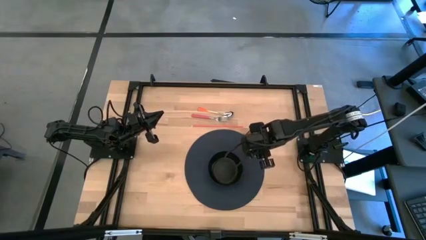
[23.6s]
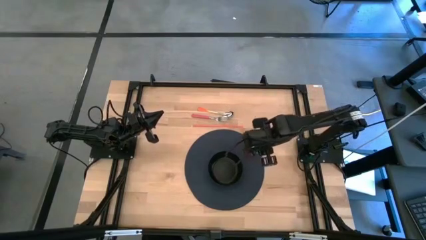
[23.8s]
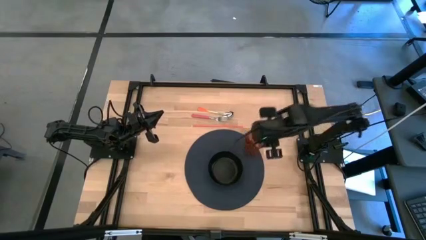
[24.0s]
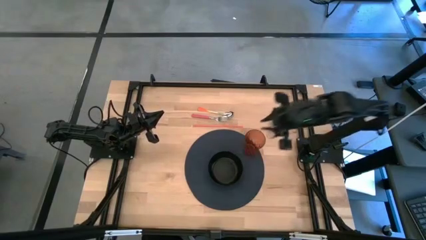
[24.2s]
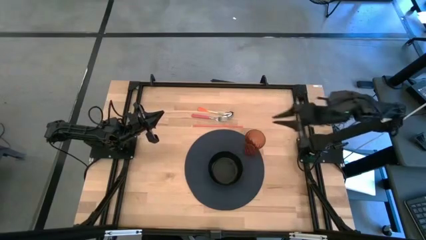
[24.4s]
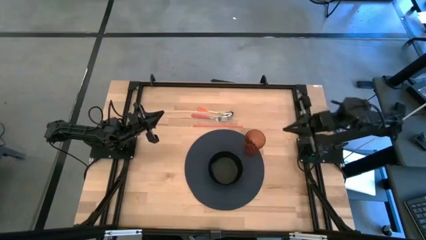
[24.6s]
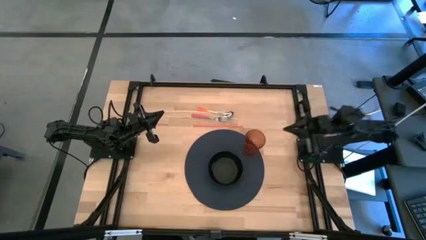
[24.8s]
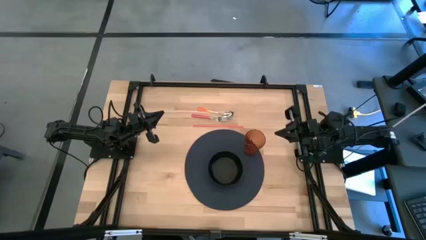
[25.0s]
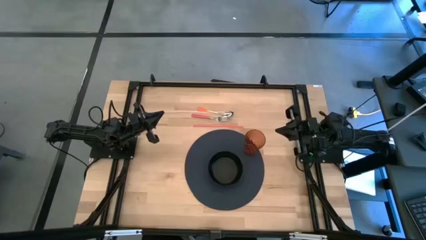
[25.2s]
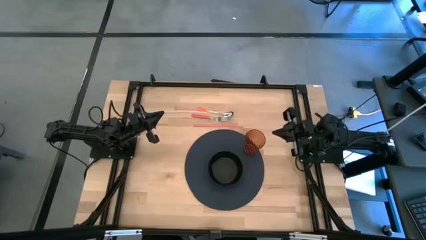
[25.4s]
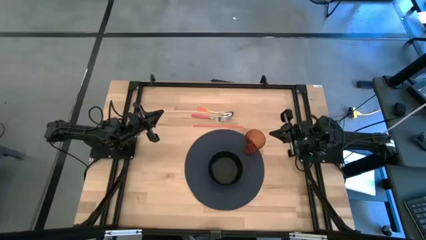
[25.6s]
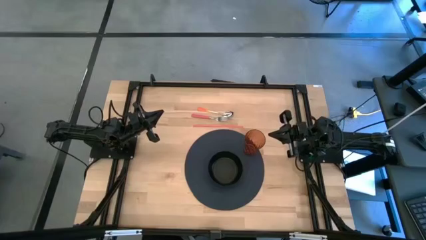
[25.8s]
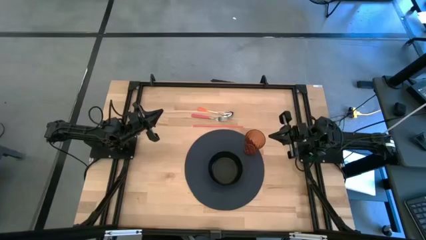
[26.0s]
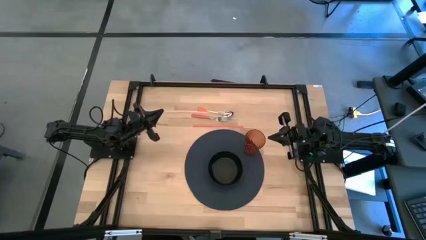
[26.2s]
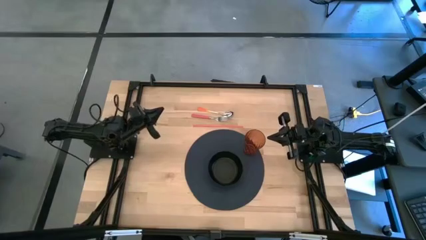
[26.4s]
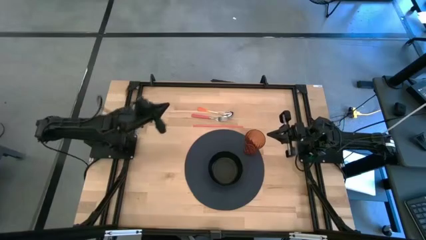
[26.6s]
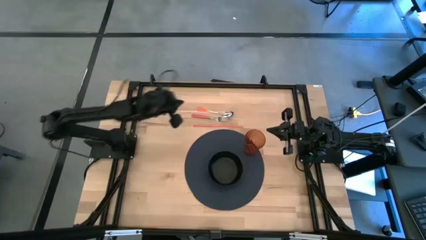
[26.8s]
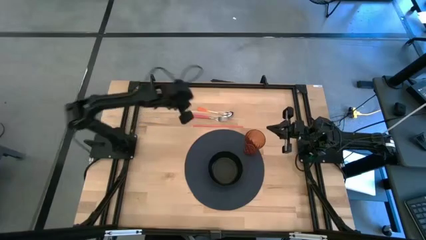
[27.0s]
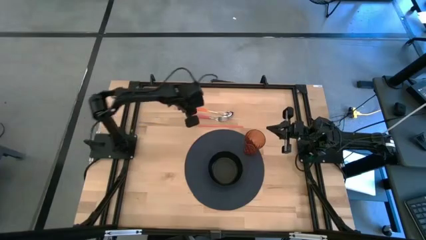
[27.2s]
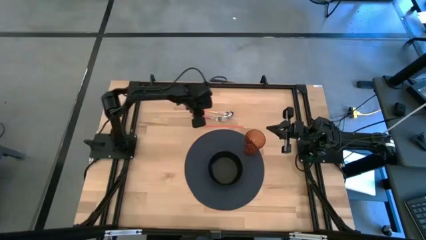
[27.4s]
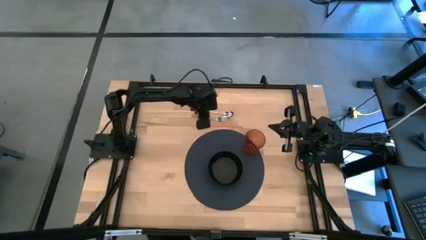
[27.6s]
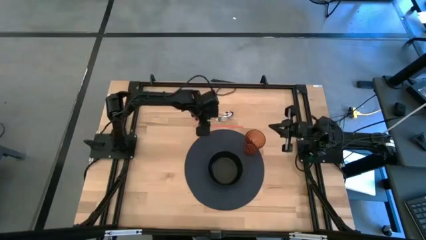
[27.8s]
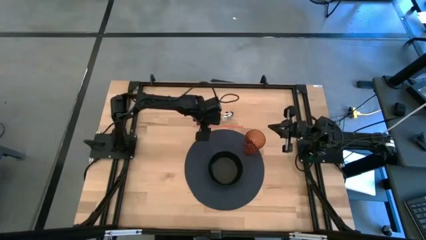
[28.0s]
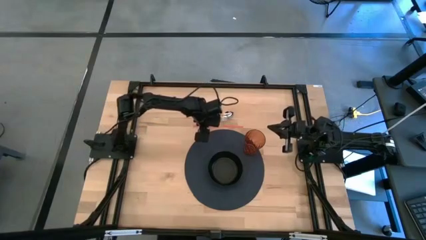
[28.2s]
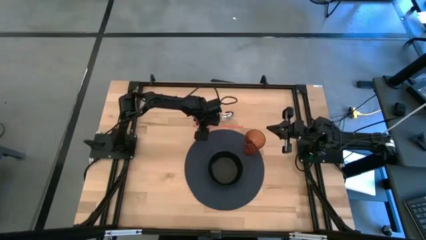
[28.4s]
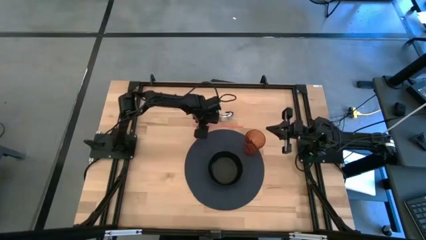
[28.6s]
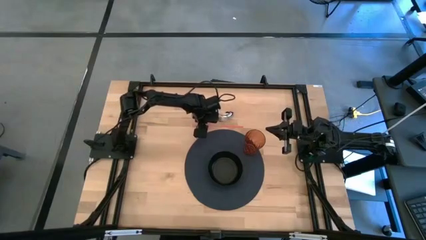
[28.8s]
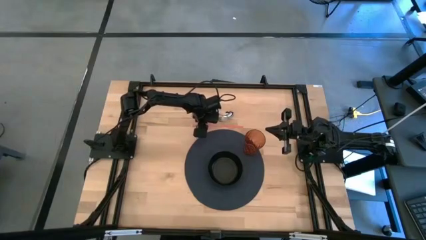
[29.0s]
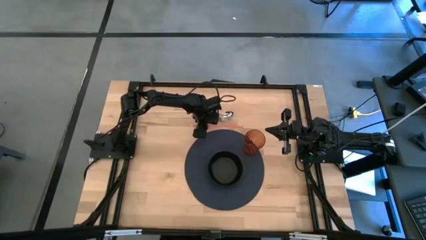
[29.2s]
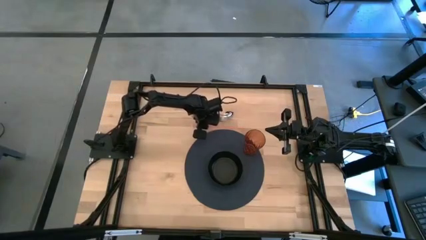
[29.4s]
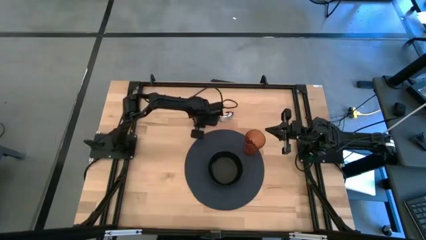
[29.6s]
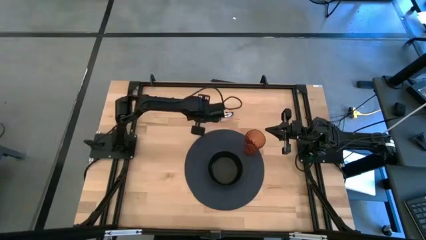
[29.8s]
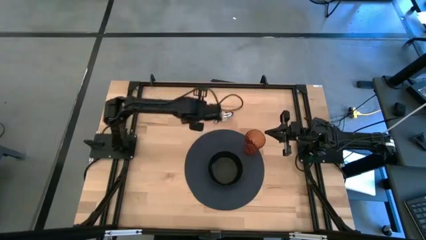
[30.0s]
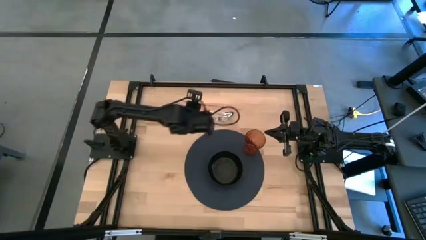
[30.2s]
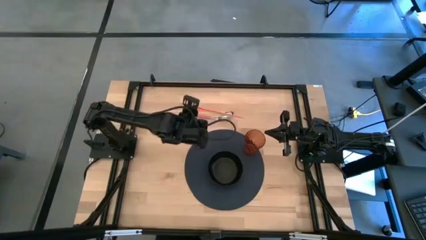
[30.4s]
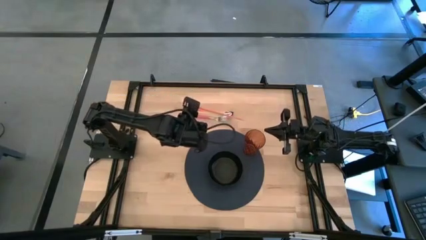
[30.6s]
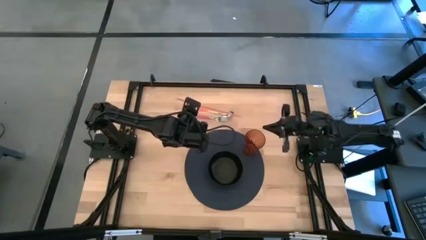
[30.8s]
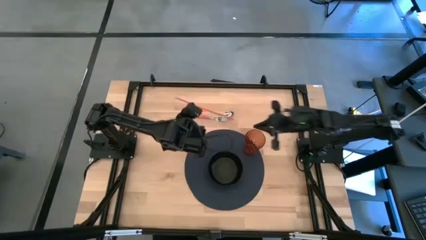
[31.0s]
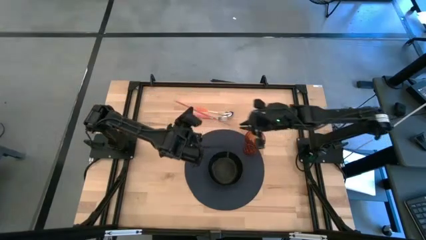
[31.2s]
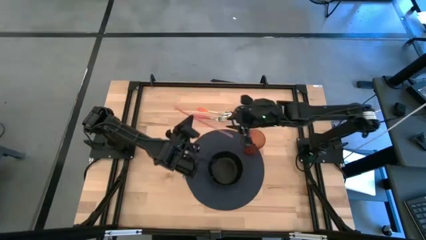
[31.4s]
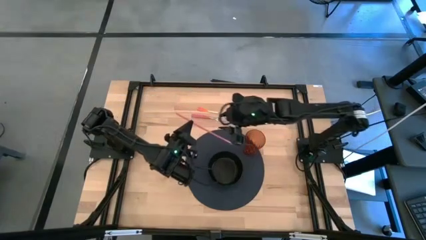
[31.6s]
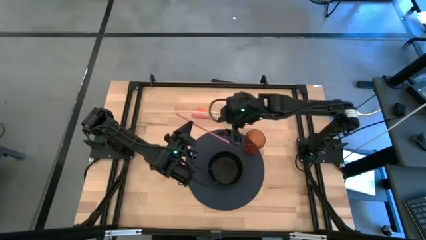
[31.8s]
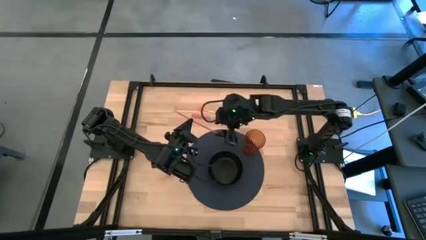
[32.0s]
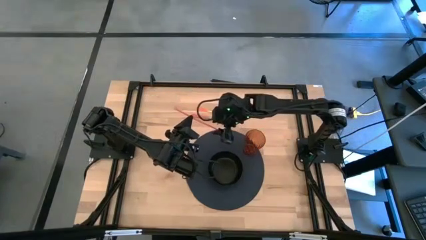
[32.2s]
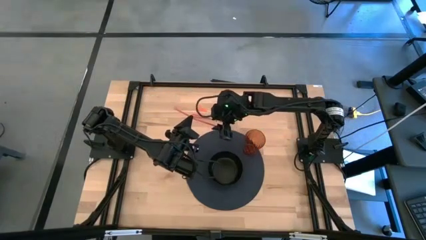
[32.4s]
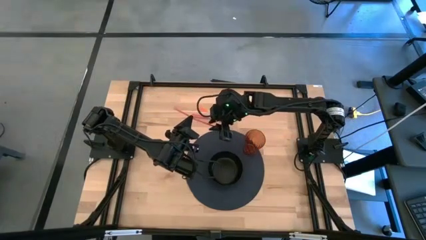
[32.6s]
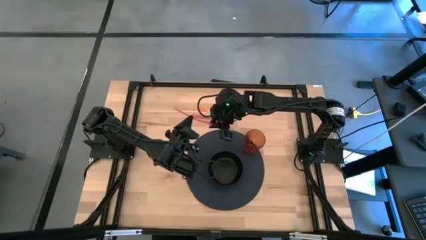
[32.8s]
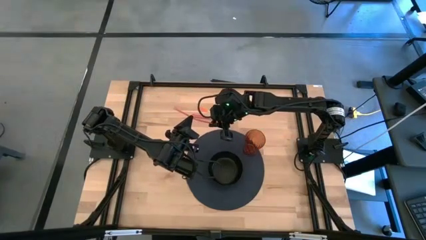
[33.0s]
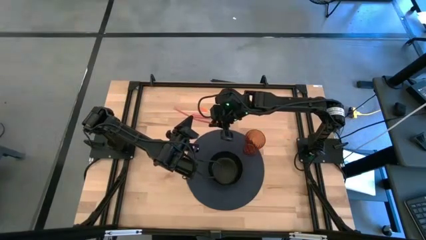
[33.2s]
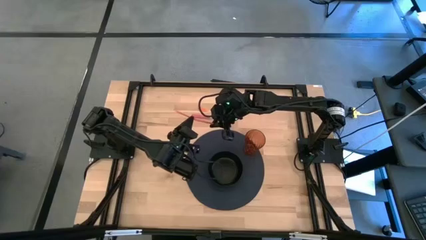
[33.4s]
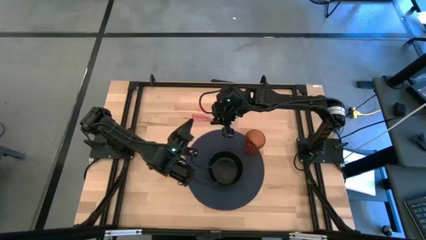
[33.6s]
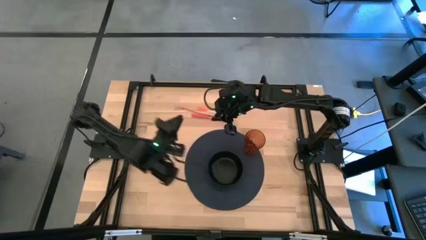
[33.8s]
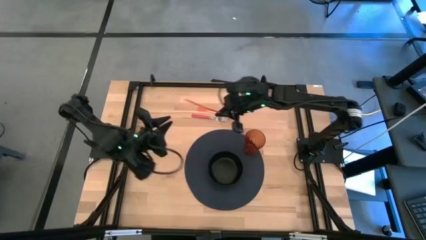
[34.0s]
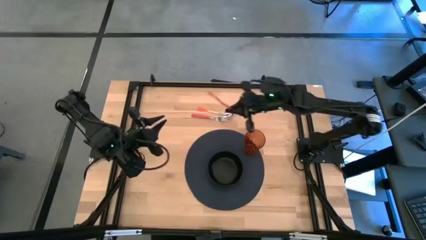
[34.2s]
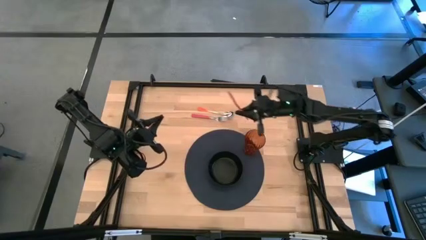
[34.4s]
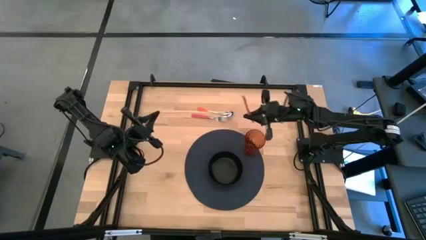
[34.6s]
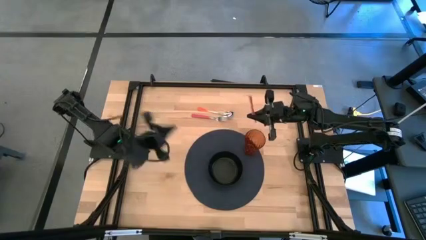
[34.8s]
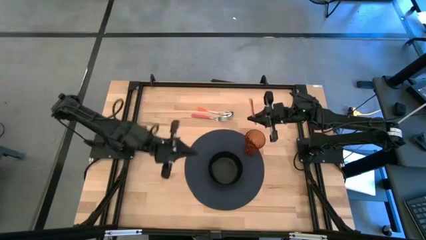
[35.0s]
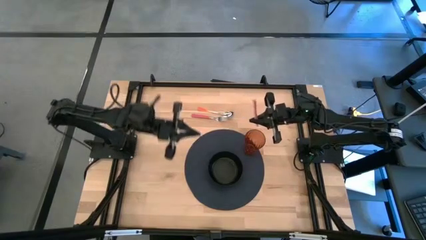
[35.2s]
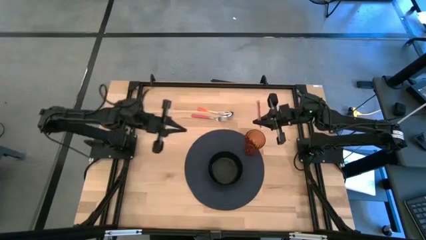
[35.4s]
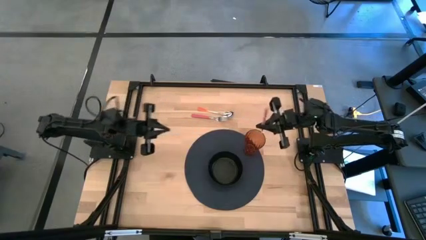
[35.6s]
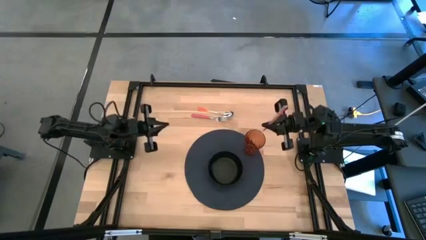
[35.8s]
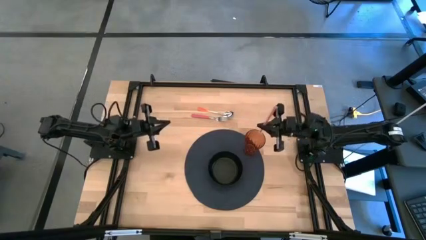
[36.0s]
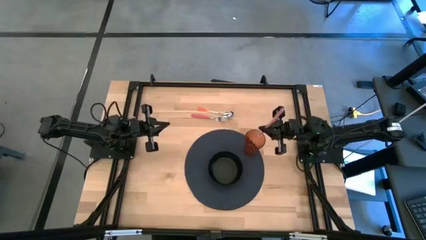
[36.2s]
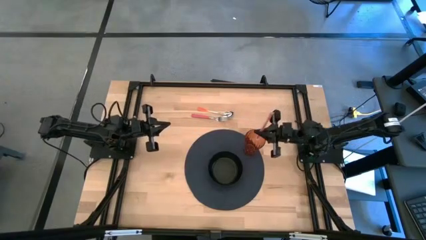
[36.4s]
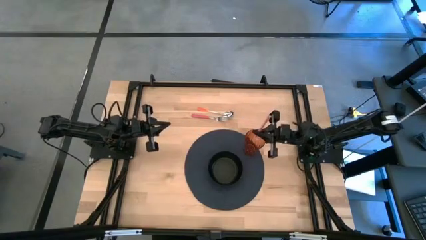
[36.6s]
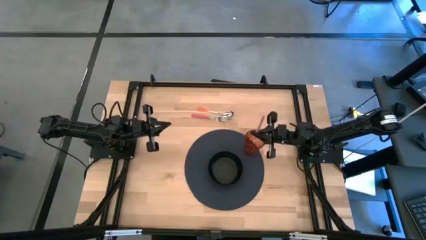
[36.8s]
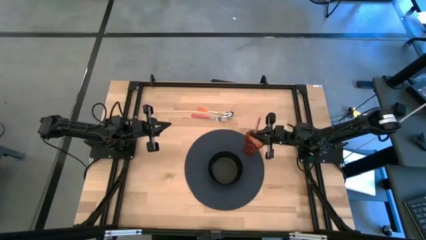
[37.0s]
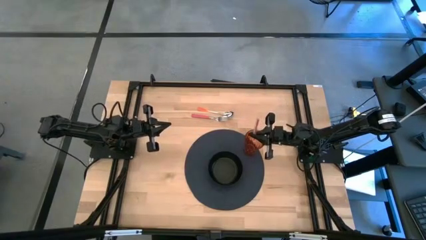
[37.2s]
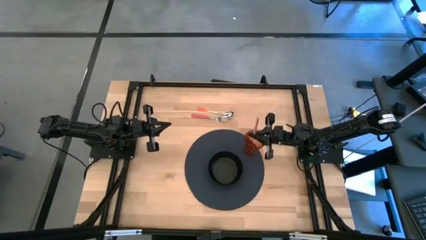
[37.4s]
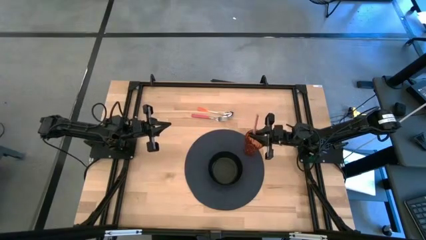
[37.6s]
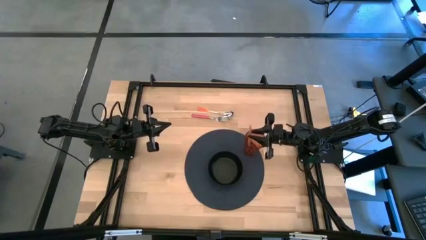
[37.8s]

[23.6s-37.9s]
Task: Pick & Place Utensil
Put the orange straw into the brown cup
